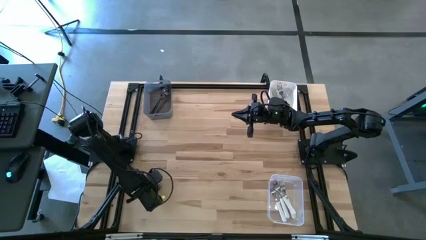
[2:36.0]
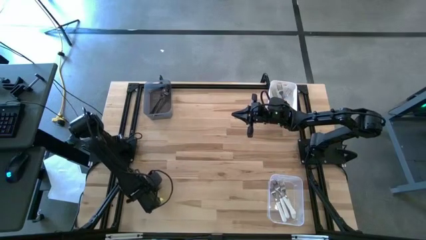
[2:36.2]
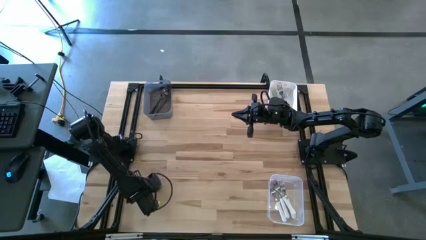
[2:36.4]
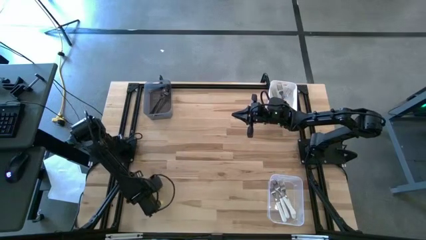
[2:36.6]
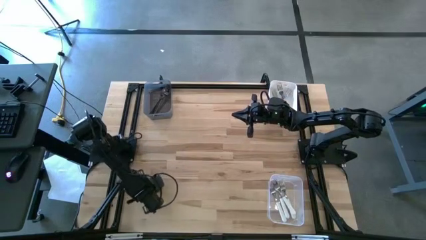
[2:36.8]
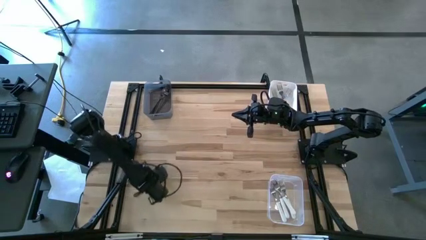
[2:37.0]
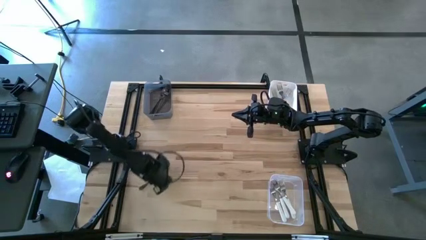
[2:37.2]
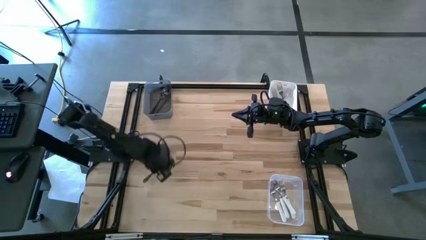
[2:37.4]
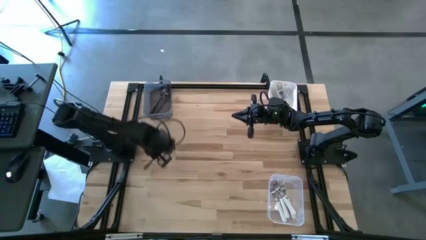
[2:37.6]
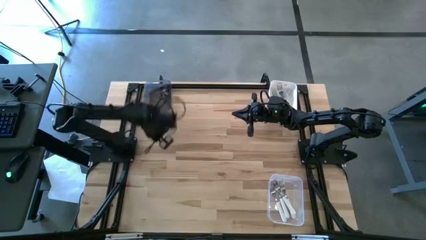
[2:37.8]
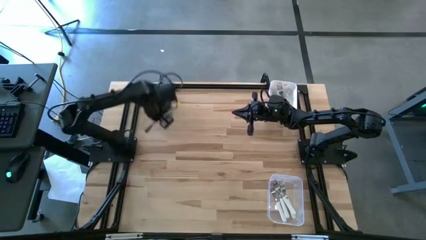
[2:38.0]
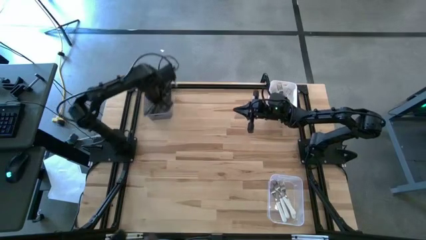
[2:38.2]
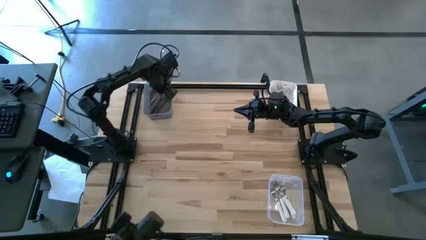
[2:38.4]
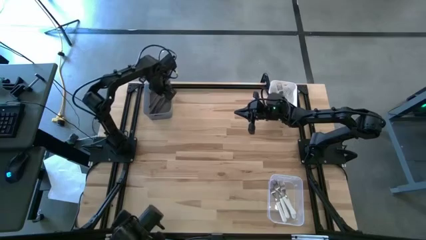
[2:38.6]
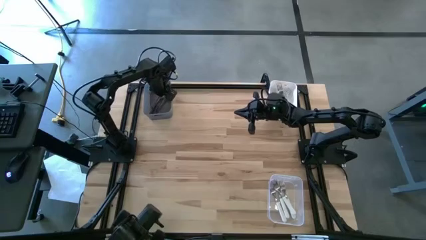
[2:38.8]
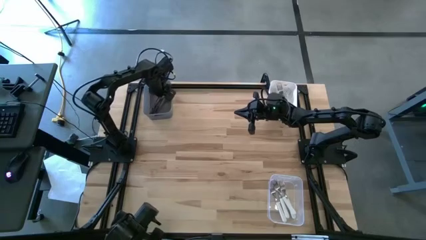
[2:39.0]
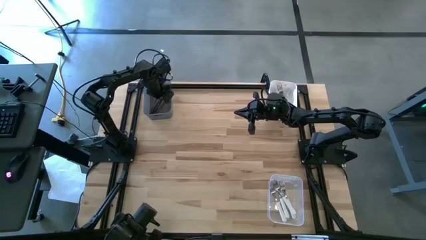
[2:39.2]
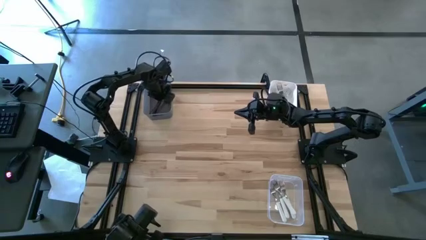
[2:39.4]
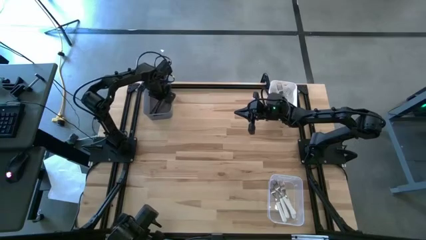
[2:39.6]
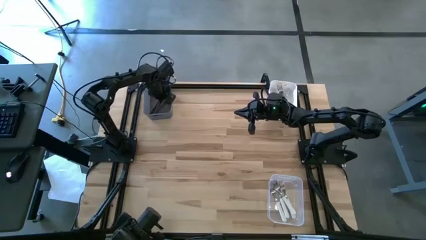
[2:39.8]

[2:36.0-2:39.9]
Task: Sort silverware by color (type)
Put the black fork into the black bin

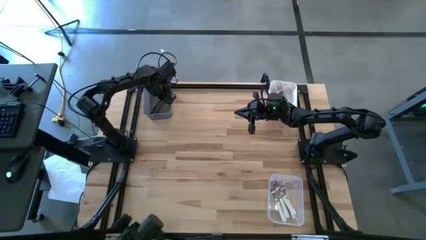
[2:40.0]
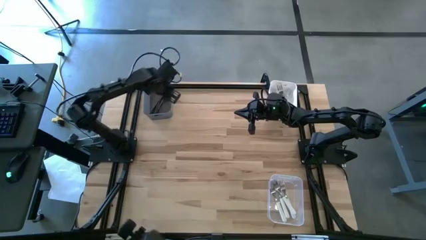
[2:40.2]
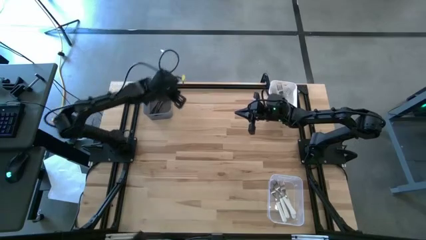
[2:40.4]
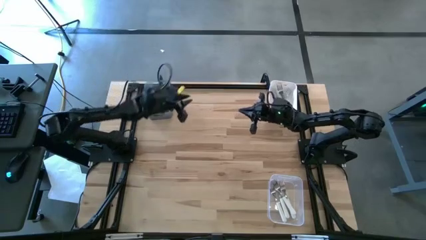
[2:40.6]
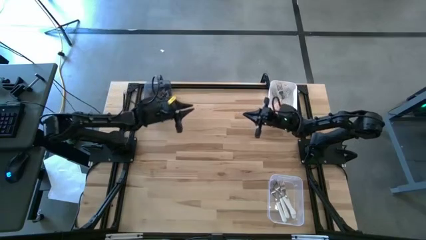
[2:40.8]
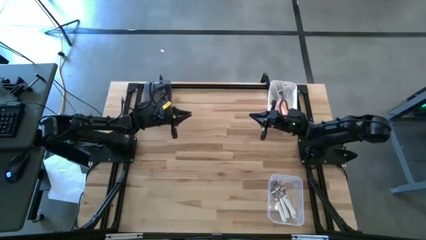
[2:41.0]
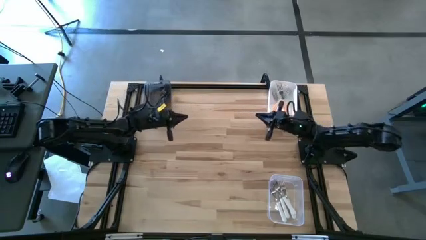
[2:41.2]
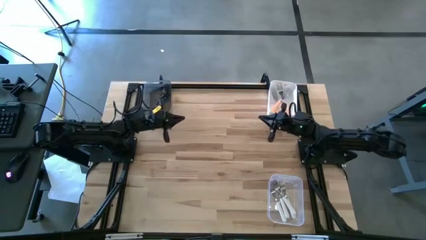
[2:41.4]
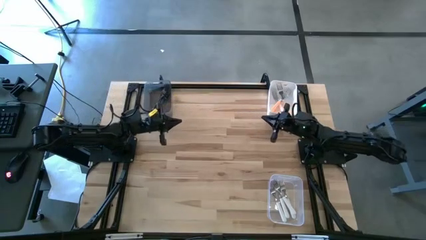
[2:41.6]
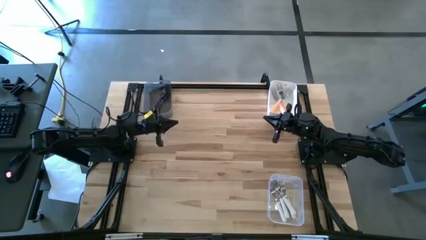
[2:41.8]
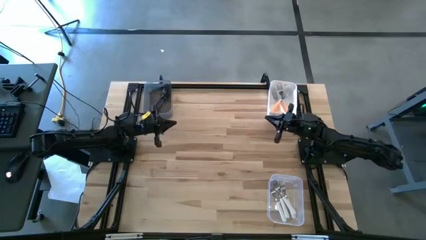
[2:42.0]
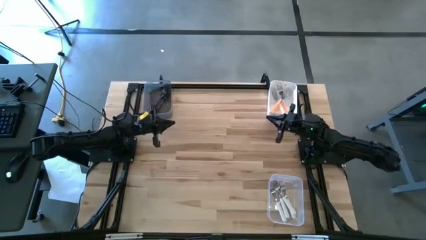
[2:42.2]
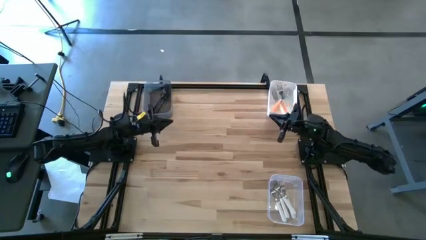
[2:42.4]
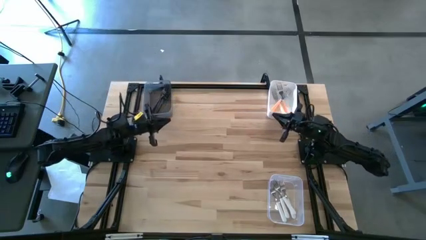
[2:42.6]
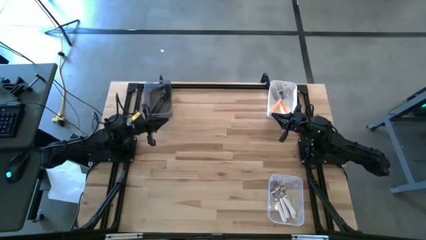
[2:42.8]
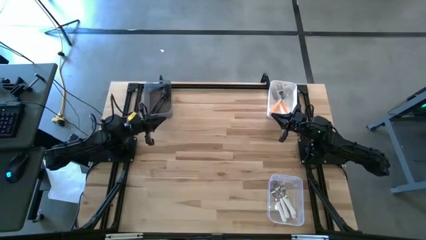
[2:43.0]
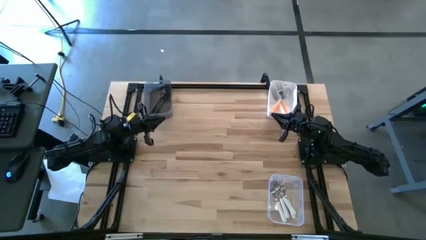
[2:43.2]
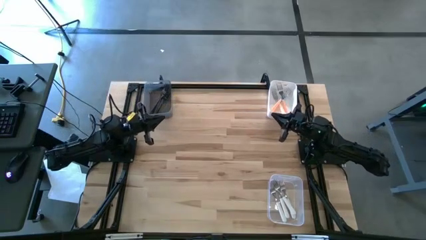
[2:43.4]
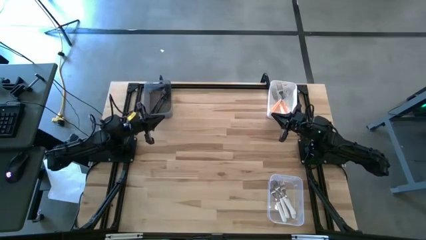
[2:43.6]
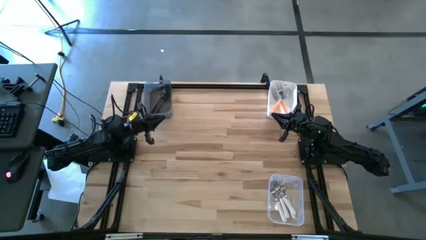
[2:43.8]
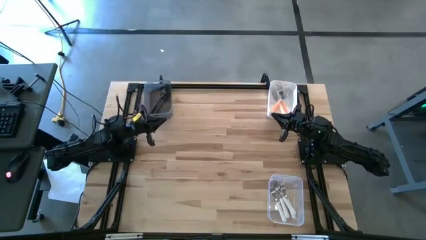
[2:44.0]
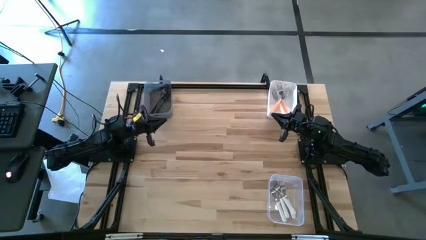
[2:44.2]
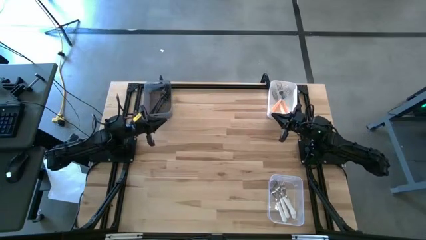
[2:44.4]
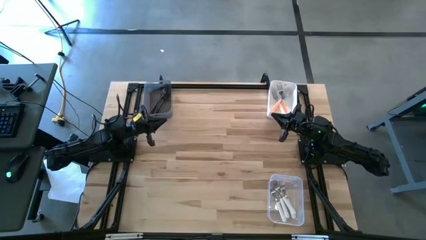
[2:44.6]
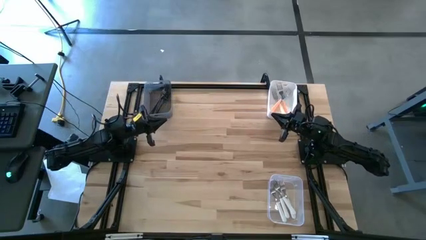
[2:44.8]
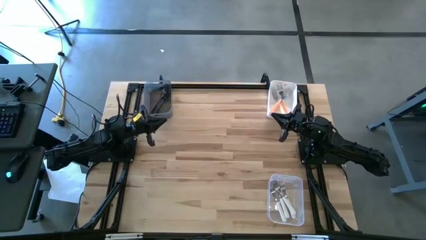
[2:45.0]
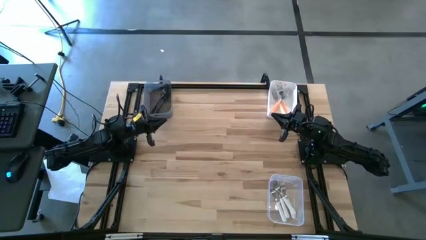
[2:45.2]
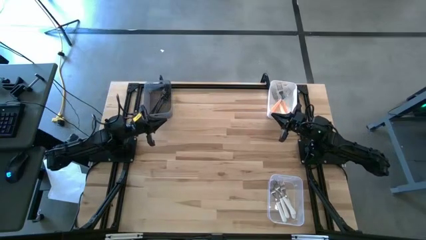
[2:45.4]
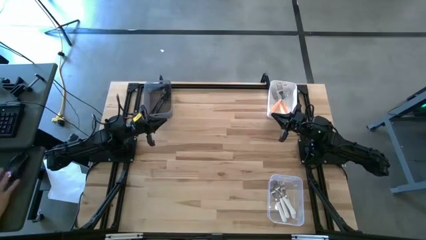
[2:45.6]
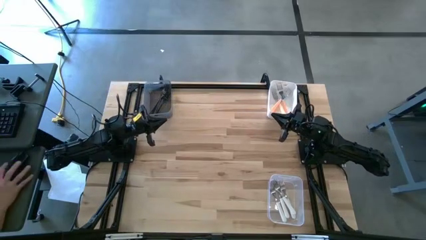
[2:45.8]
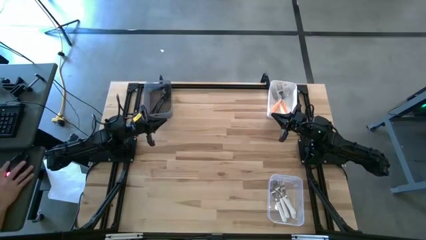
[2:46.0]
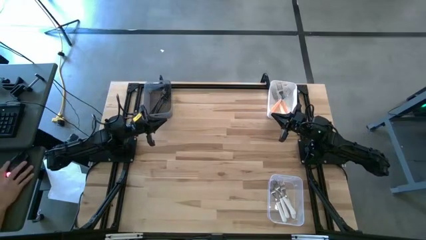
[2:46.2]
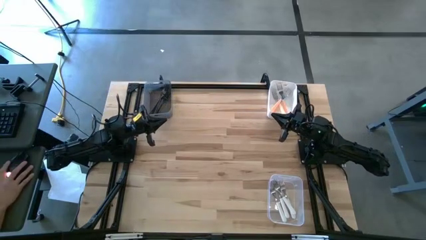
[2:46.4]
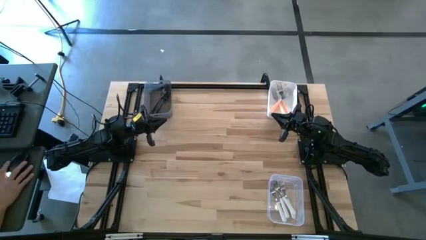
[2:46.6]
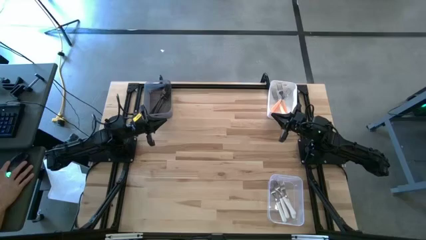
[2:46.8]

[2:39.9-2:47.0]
Return to Home Position

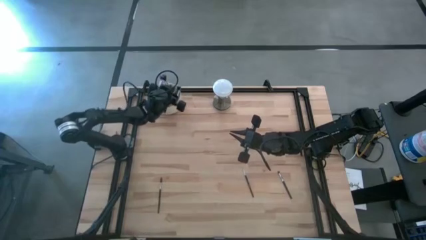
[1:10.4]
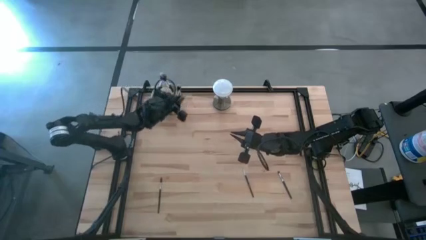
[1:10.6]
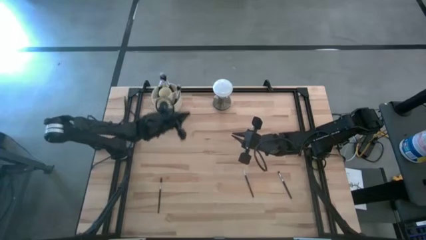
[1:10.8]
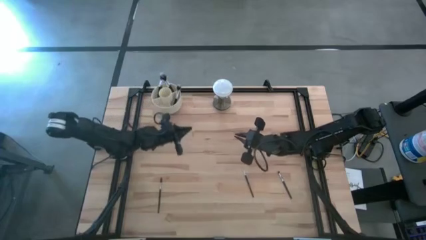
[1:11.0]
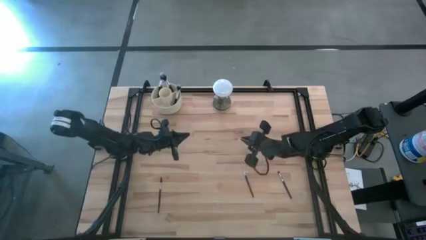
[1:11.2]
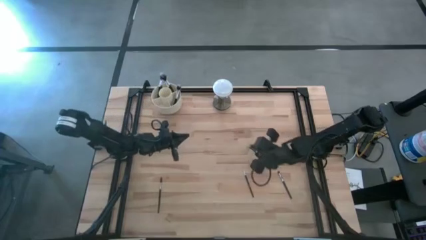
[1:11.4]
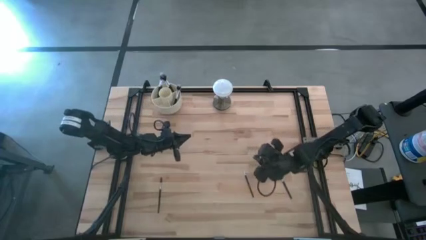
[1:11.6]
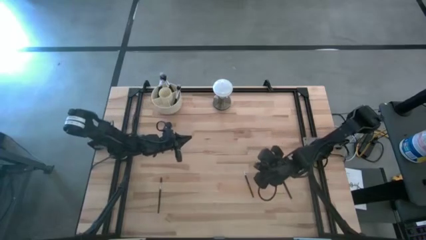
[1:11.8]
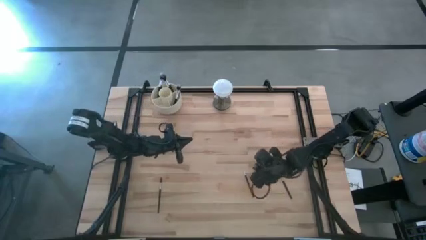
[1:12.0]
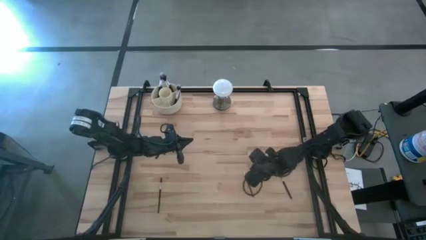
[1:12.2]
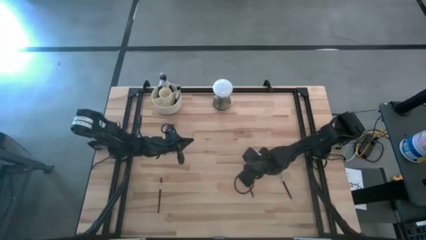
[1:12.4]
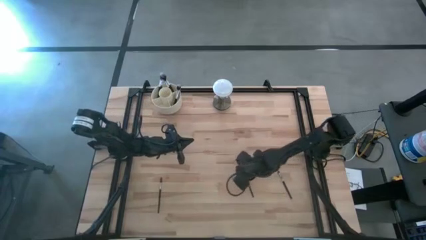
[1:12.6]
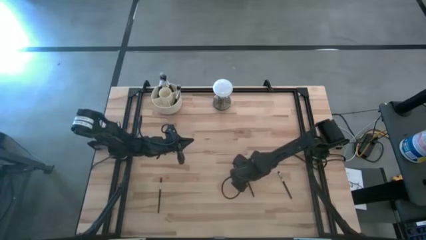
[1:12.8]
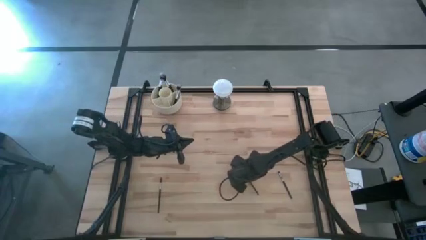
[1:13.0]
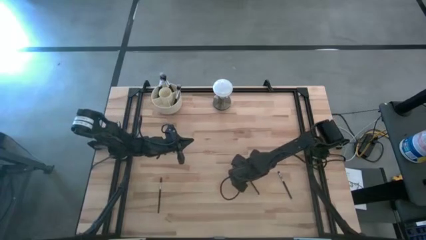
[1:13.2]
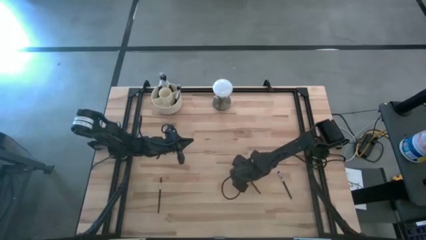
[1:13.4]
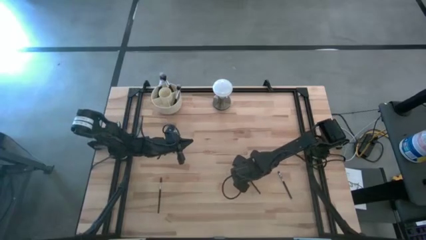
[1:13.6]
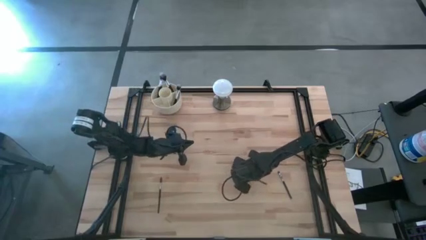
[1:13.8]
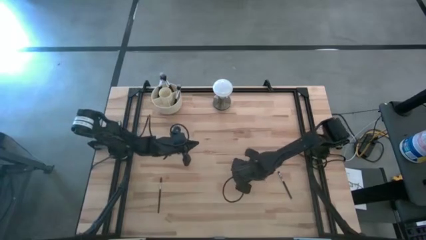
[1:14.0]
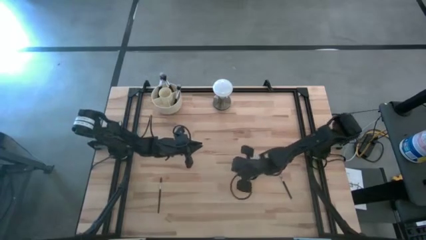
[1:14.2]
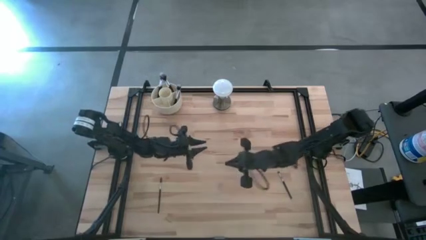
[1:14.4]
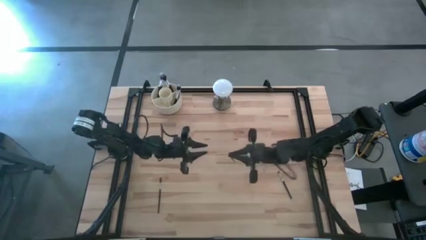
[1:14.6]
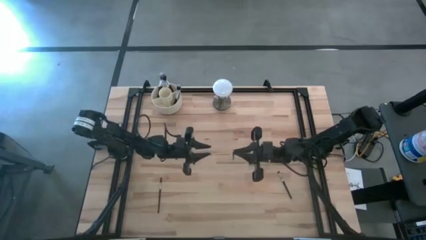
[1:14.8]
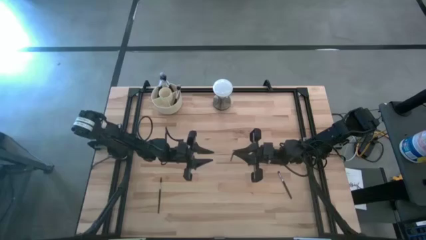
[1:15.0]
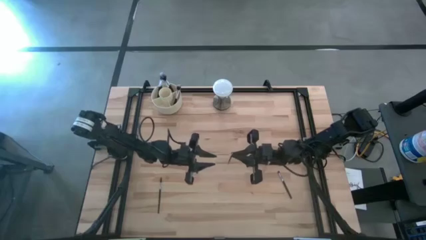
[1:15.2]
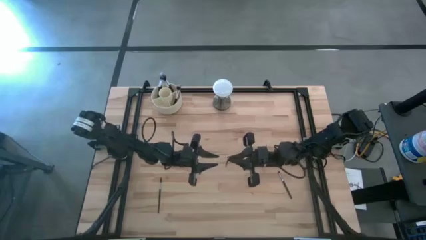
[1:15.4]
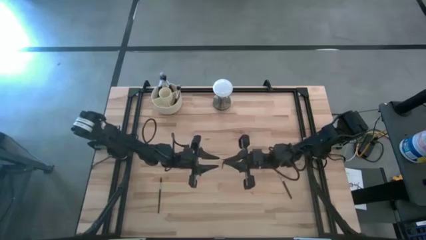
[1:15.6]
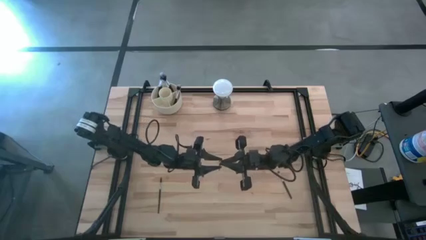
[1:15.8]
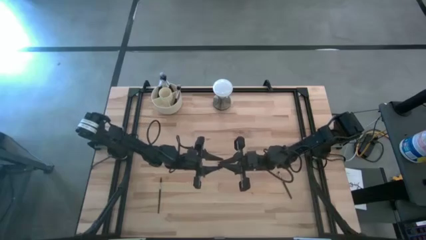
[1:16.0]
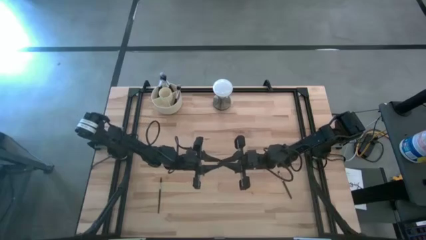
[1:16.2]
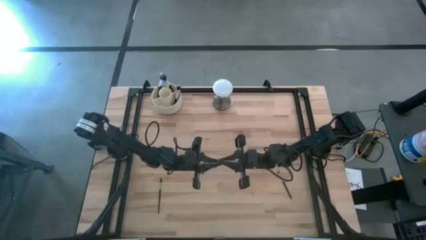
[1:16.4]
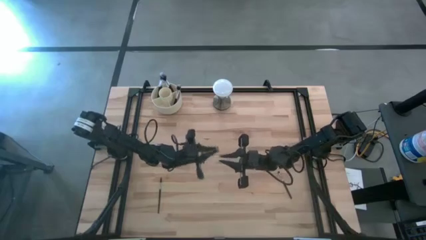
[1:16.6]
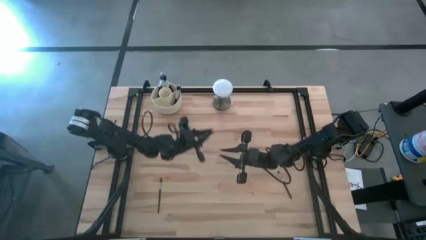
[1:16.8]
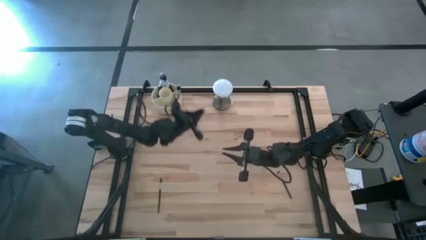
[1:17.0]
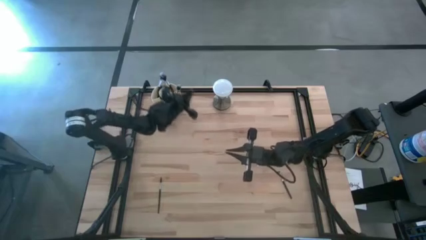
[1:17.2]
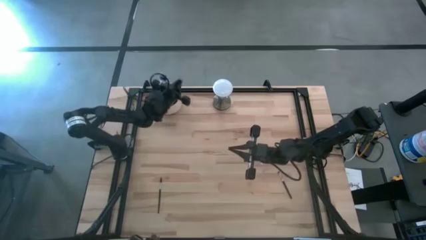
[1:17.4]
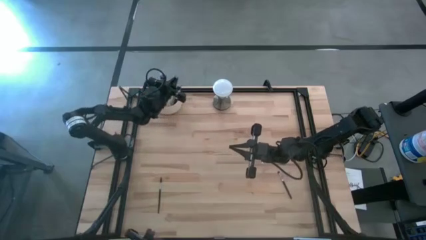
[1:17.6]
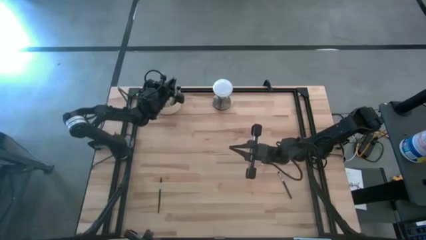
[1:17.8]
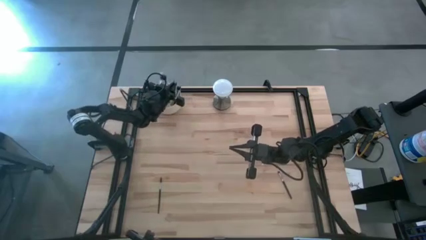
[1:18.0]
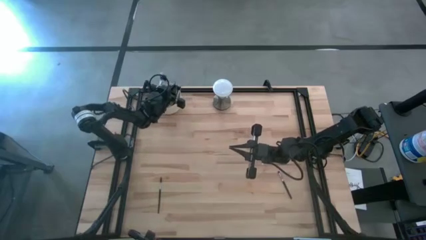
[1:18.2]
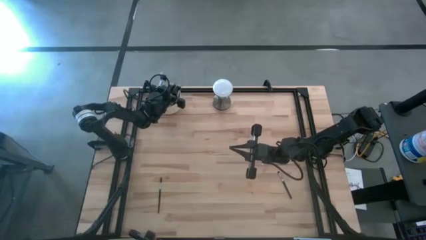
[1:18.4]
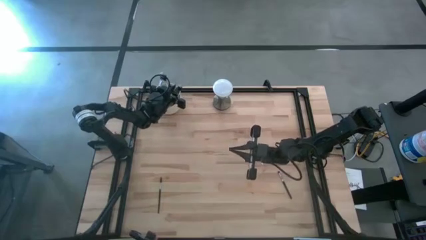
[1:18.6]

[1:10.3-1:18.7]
Task: Put items in baskets/containers
Put the liner brush into the organizer
